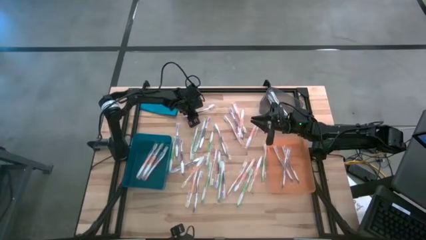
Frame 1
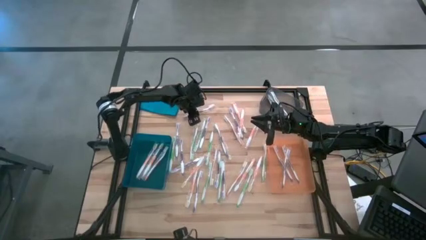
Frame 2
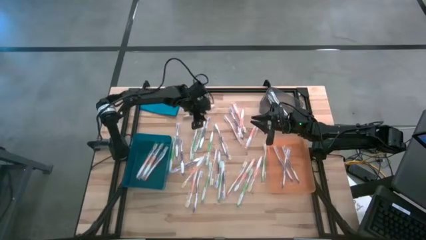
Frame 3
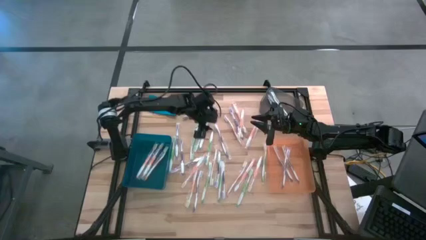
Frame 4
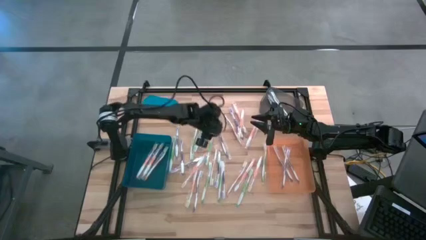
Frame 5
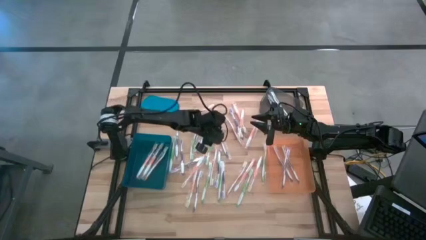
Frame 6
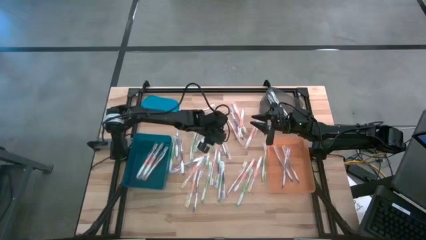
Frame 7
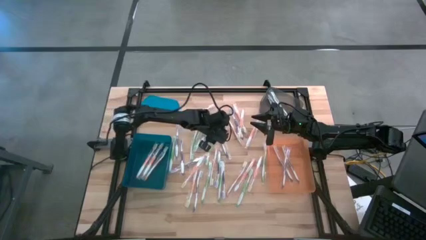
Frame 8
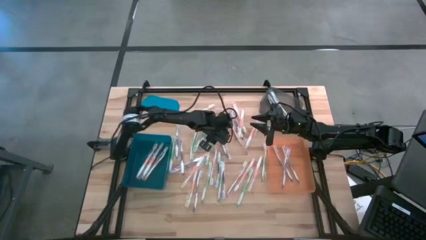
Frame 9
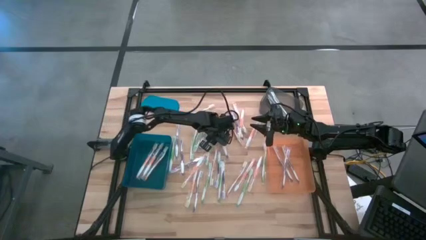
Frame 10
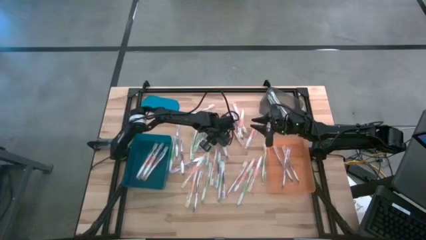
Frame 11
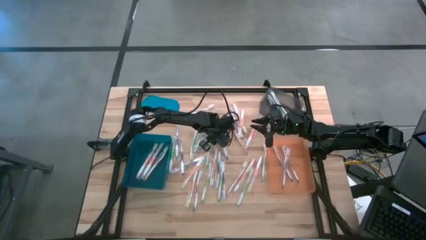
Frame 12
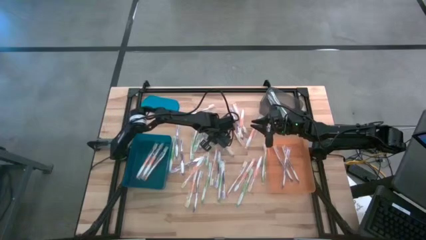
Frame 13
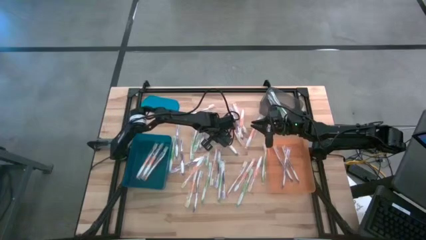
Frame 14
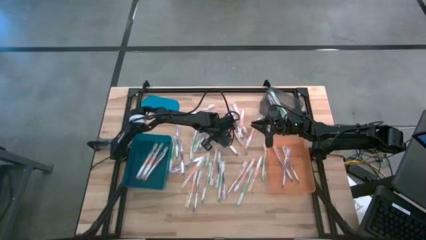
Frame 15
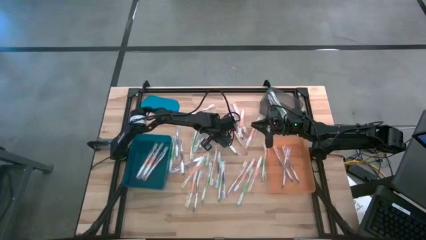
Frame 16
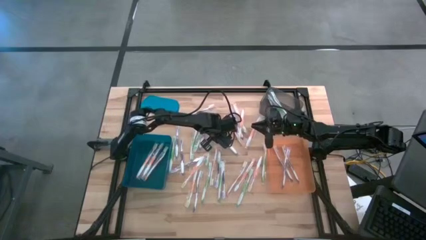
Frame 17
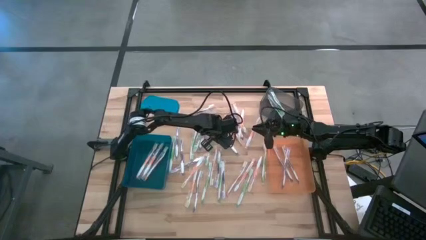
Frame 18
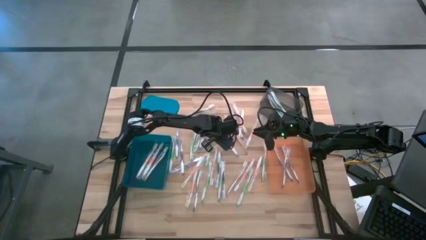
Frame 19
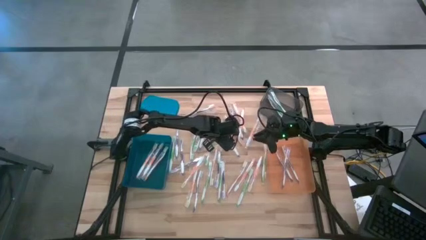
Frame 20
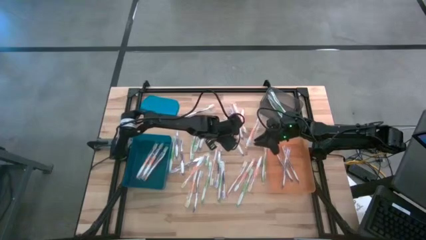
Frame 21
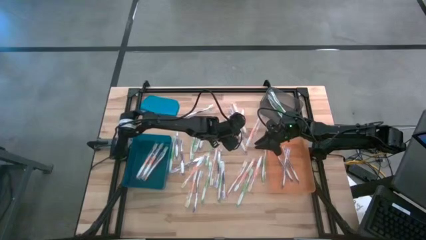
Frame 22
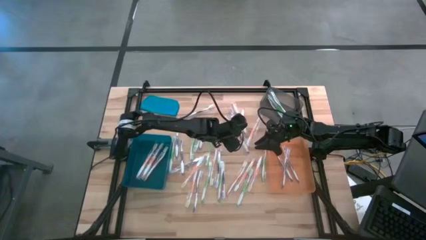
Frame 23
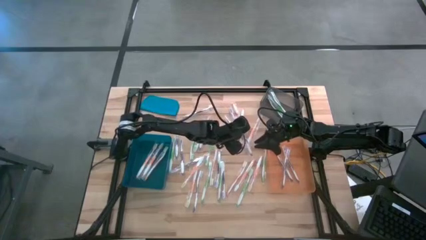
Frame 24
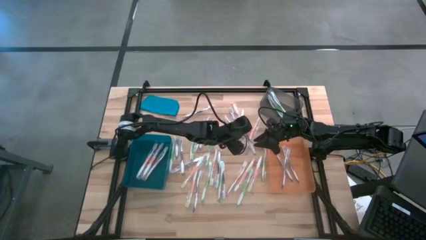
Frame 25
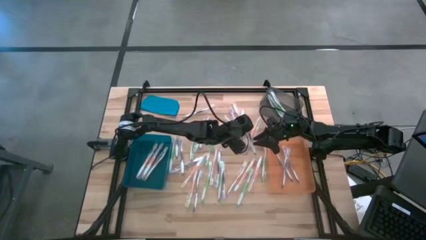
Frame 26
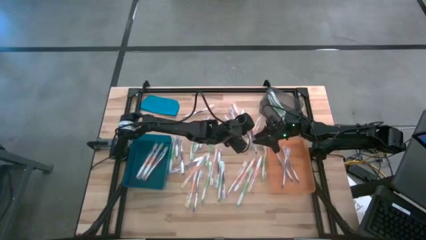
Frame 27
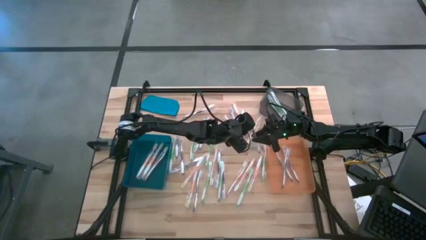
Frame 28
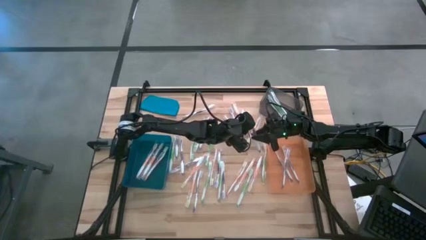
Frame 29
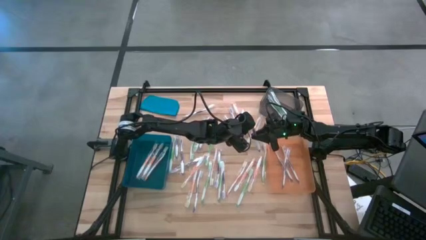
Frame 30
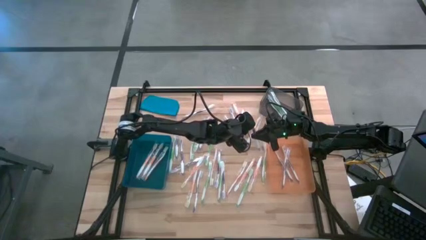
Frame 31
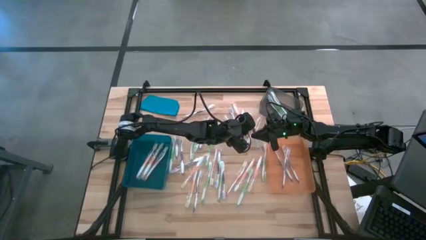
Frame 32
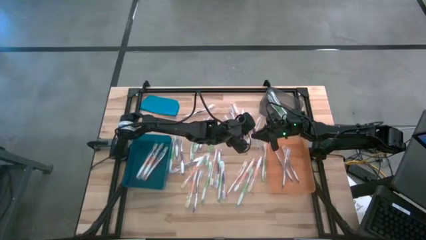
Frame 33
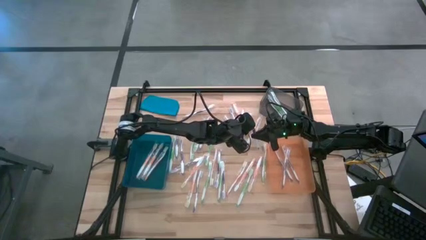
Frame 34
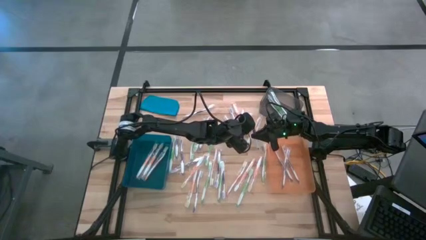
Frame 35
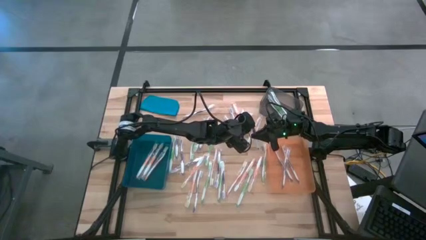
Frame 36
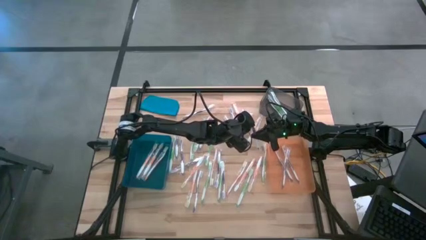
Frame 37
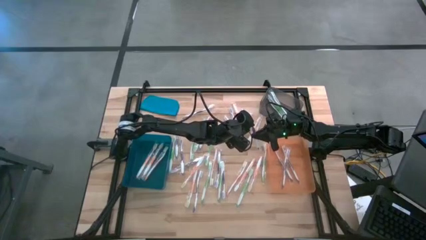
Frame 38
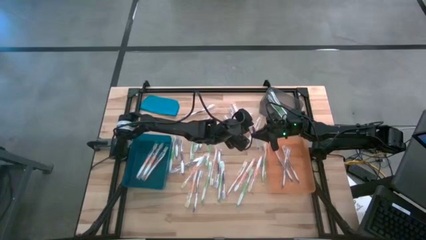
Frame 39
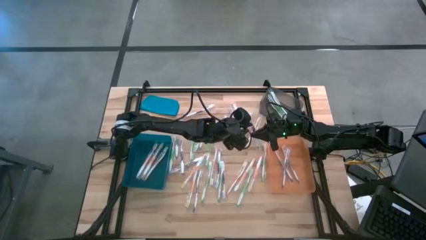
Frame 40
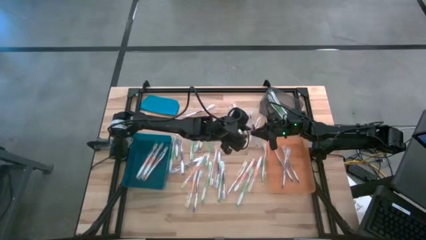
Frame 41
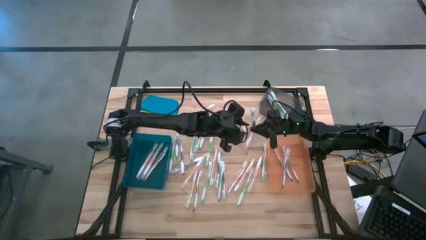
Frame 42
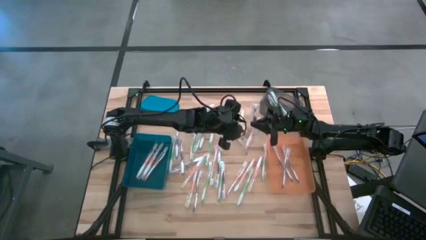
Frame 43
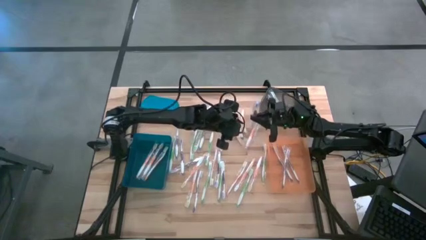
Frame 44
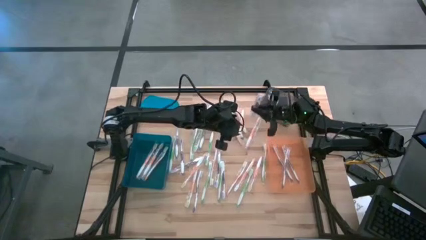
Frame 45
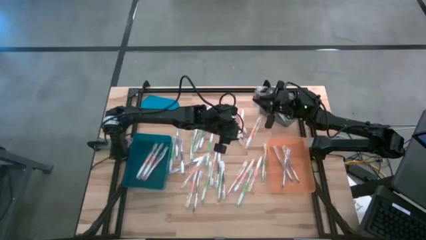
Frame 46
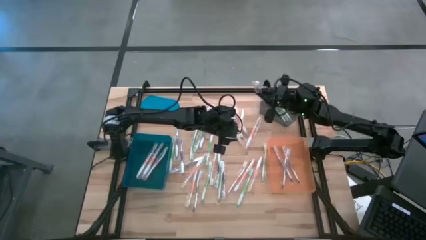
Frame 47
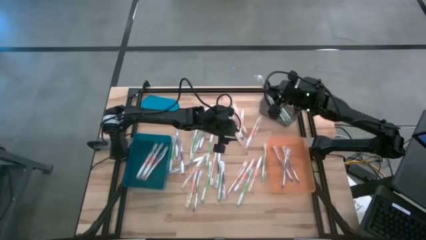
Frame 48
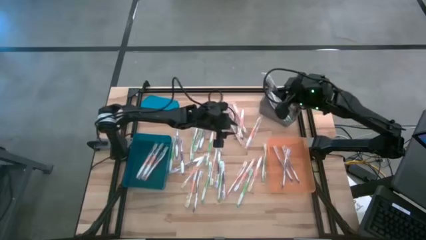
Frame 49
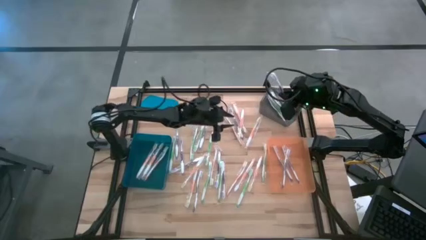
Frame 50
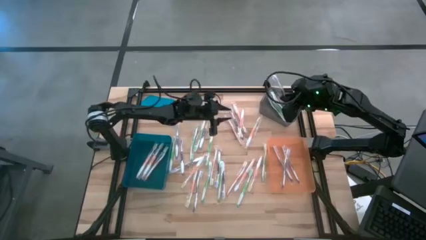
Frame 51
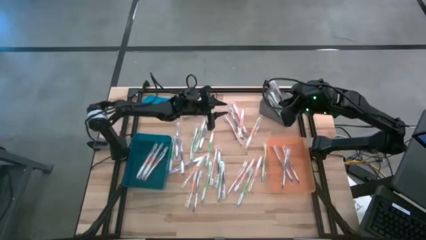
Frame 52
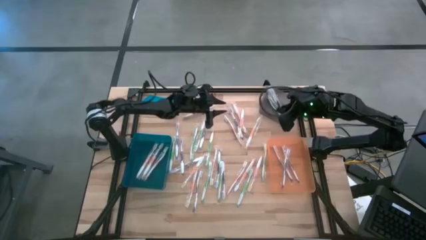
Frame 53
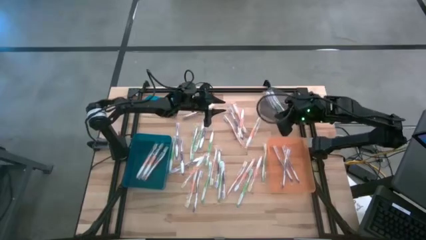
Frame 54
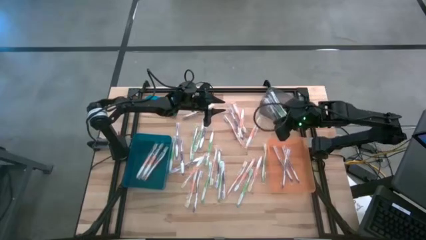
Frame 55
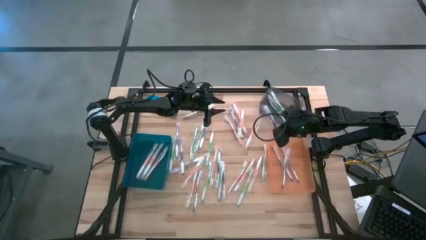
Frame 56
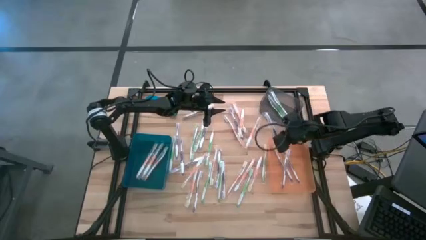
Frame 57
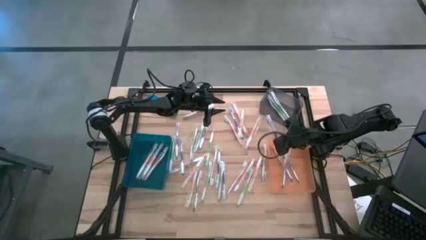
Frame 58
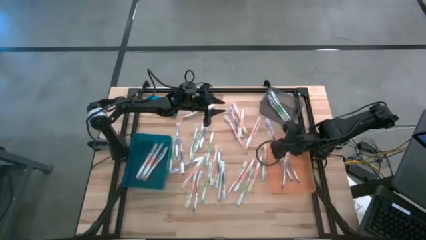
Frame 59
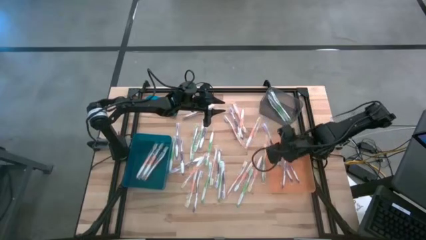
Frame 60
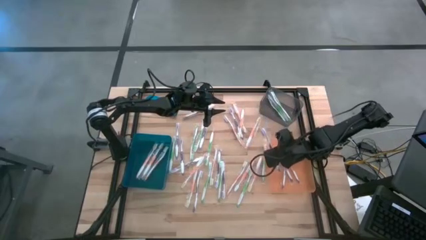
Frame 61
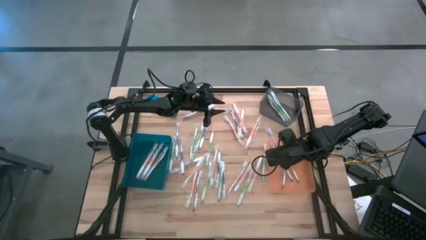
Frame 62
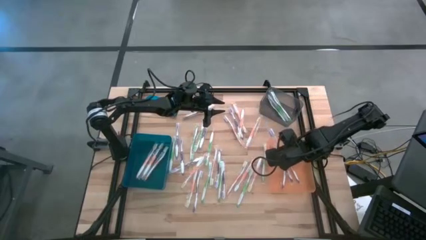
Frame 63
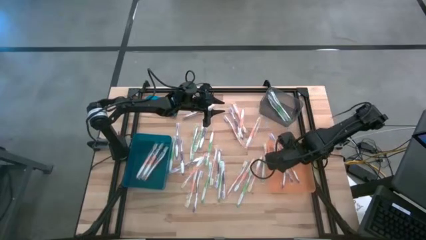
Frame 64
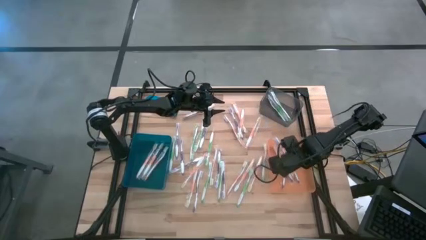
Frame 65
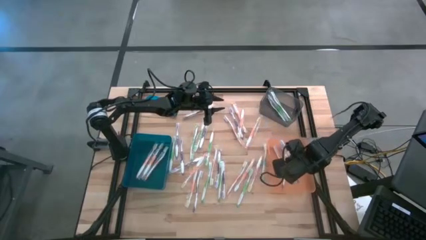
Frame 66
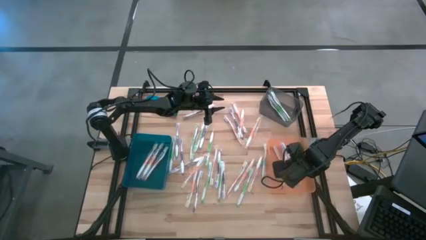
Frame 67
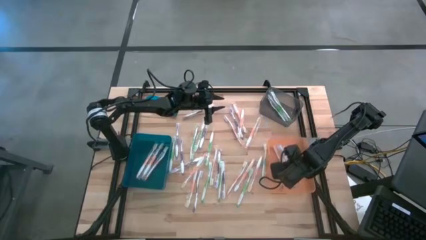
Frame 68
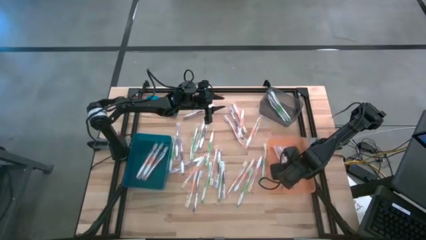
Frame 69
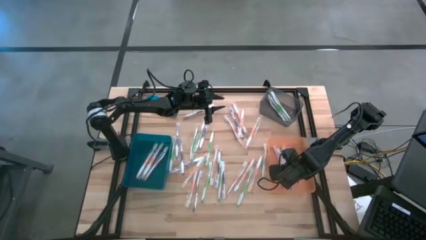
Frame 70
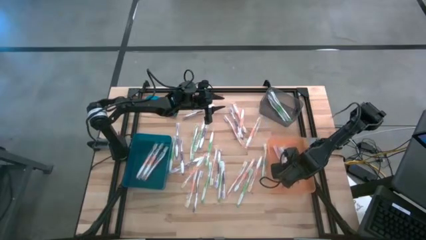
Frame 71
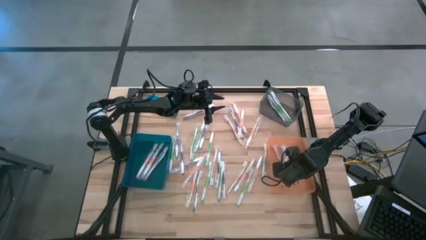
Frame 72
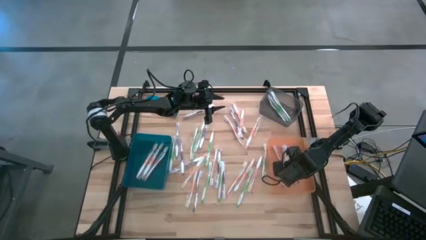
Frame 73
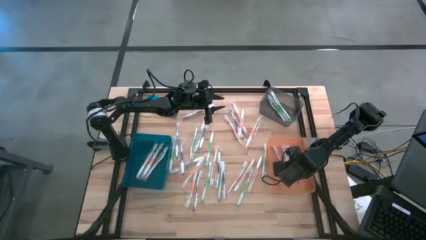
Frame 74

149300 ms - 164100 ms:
Task: Pick & Place Toothbrushes
Put the purple toothbrush into the orange bin
